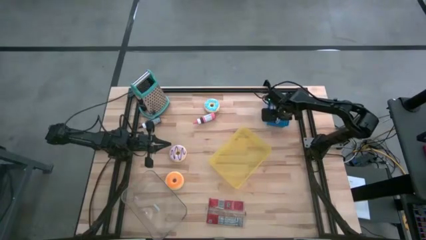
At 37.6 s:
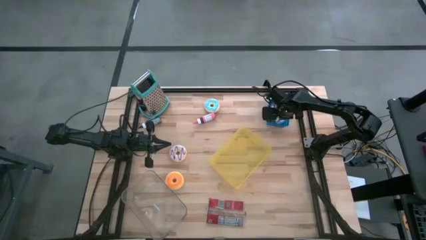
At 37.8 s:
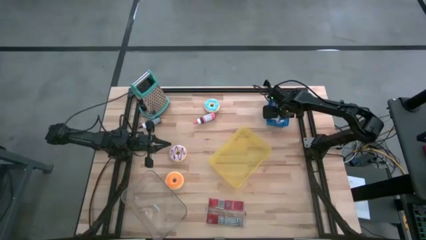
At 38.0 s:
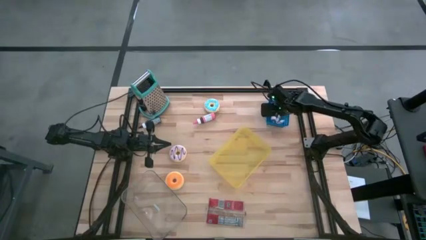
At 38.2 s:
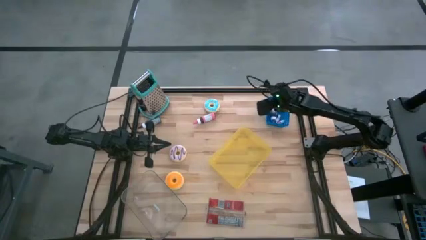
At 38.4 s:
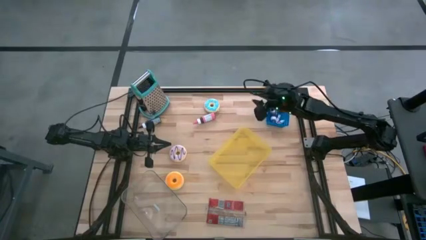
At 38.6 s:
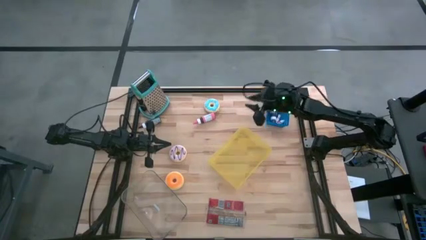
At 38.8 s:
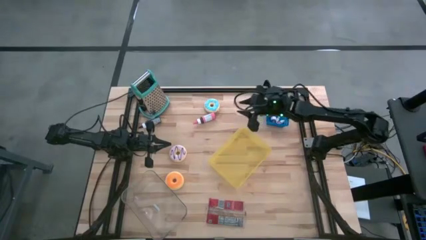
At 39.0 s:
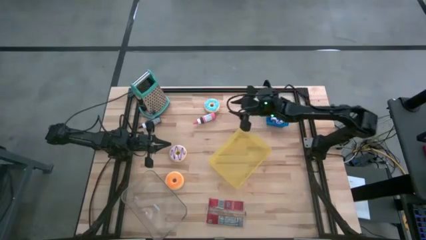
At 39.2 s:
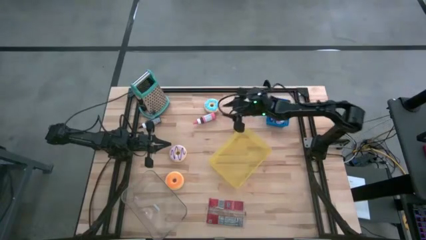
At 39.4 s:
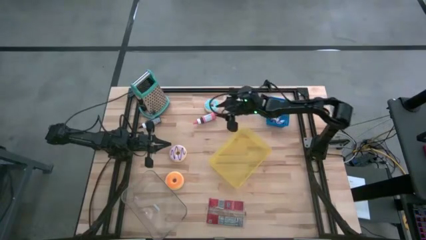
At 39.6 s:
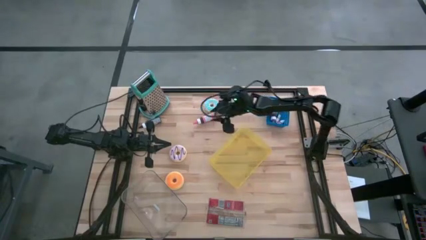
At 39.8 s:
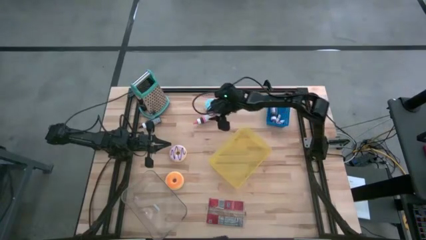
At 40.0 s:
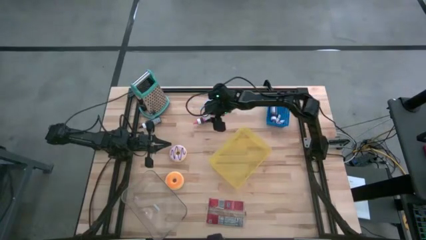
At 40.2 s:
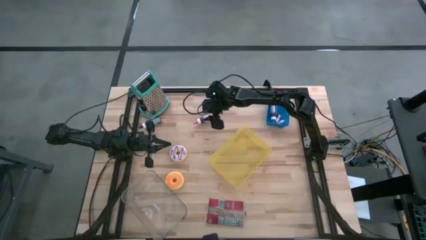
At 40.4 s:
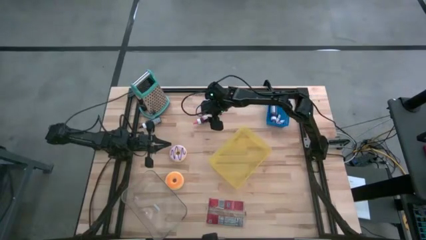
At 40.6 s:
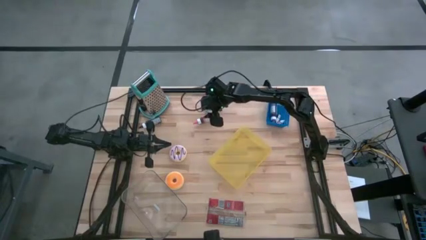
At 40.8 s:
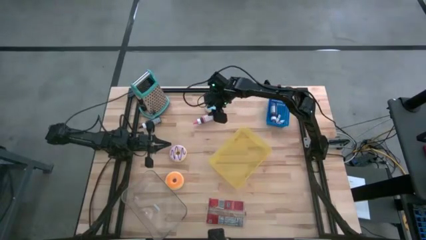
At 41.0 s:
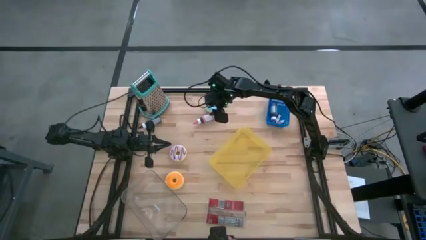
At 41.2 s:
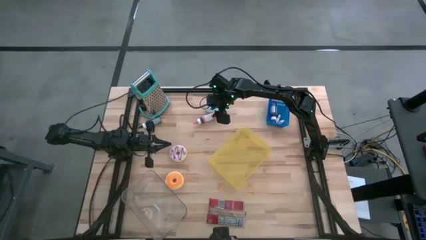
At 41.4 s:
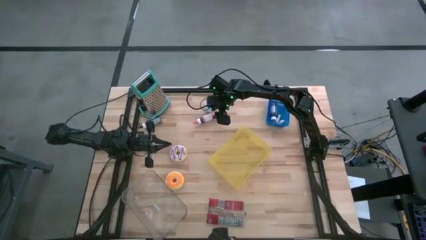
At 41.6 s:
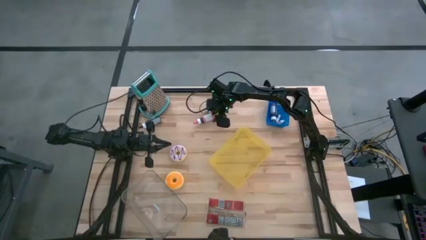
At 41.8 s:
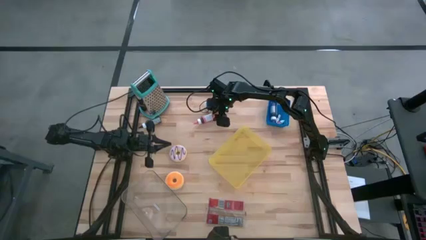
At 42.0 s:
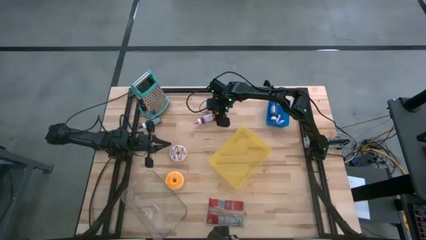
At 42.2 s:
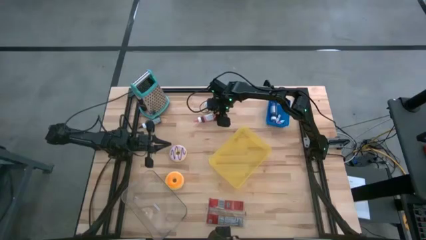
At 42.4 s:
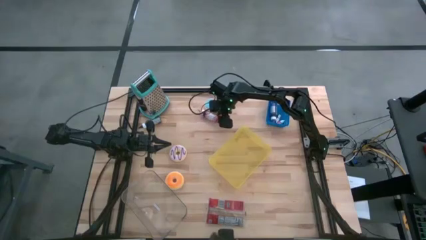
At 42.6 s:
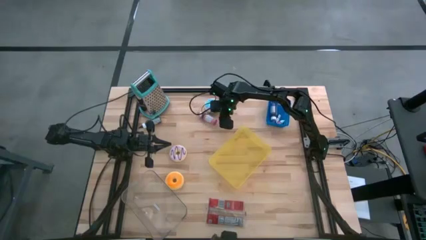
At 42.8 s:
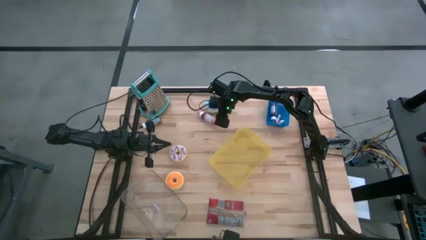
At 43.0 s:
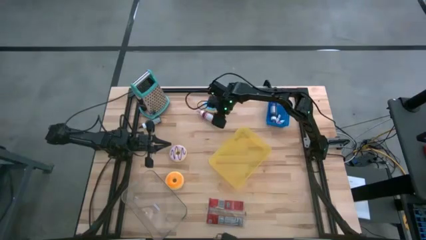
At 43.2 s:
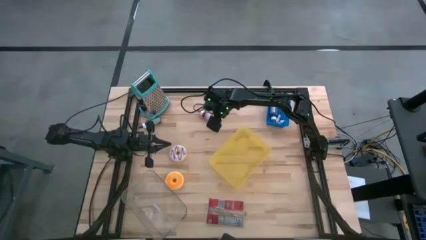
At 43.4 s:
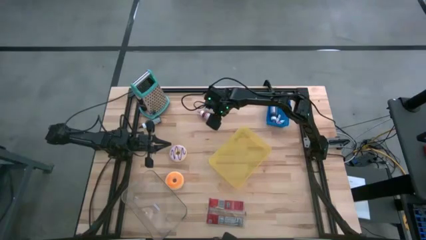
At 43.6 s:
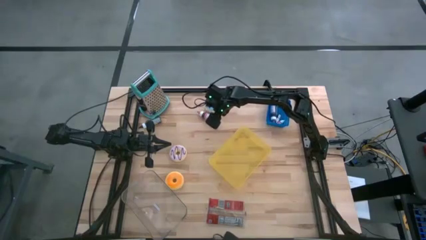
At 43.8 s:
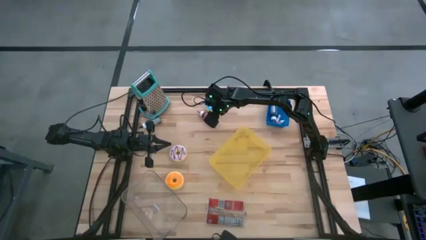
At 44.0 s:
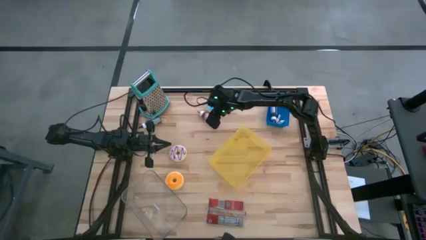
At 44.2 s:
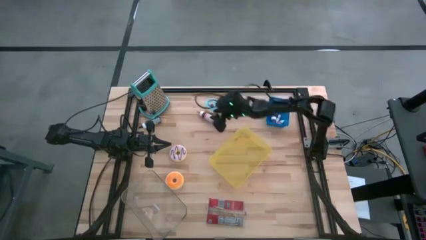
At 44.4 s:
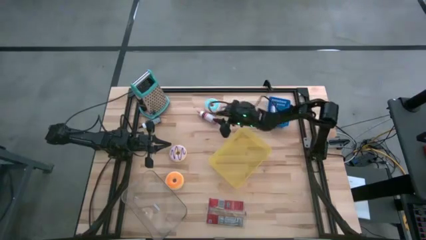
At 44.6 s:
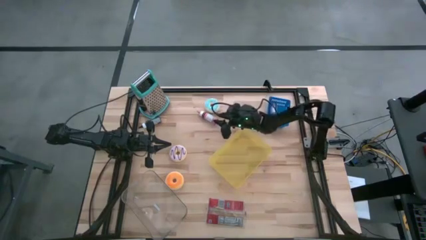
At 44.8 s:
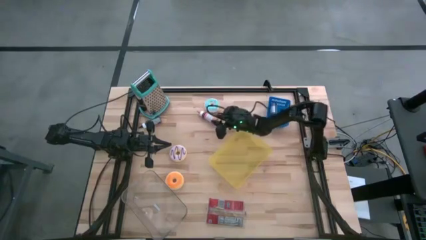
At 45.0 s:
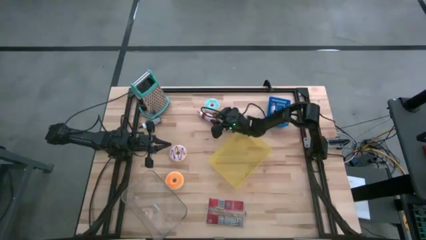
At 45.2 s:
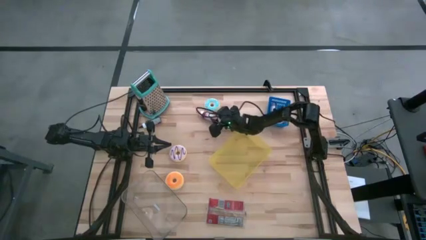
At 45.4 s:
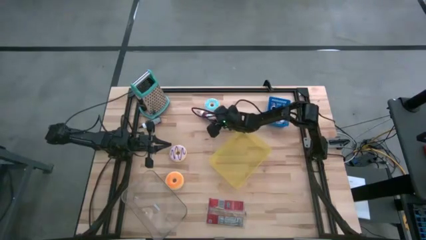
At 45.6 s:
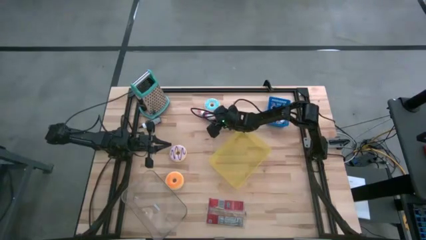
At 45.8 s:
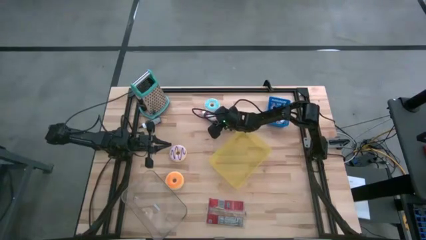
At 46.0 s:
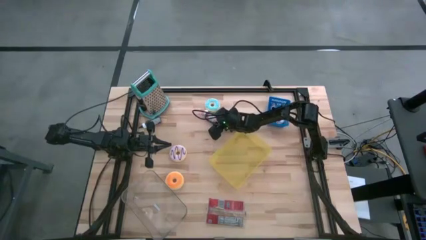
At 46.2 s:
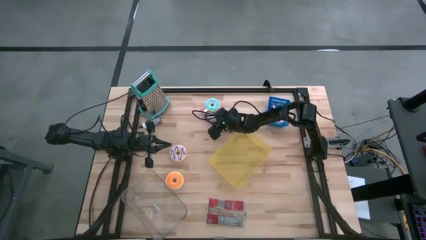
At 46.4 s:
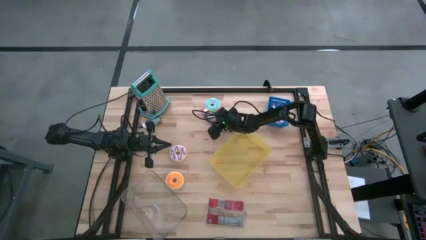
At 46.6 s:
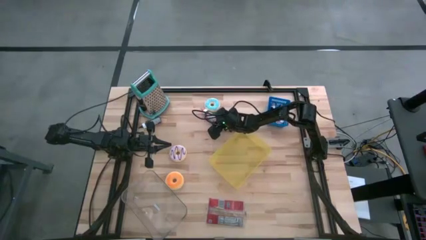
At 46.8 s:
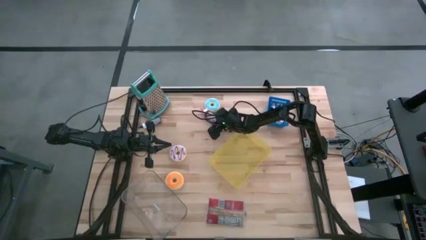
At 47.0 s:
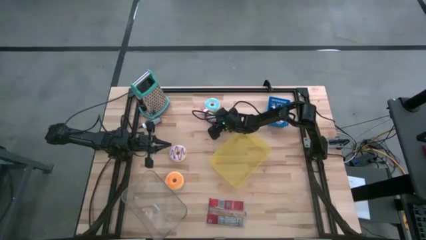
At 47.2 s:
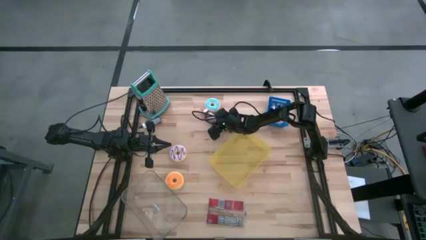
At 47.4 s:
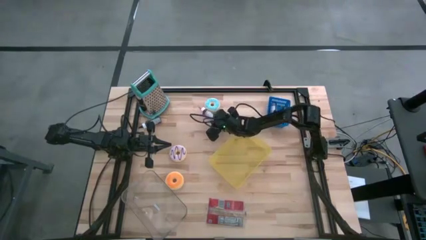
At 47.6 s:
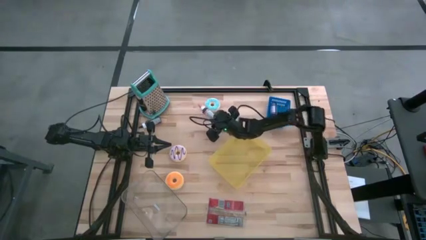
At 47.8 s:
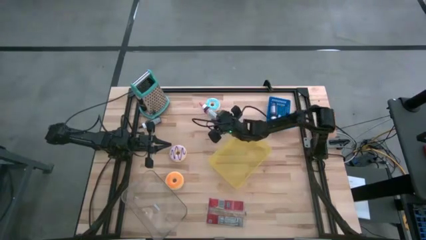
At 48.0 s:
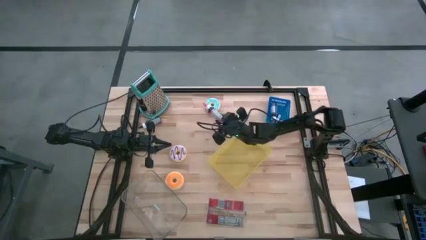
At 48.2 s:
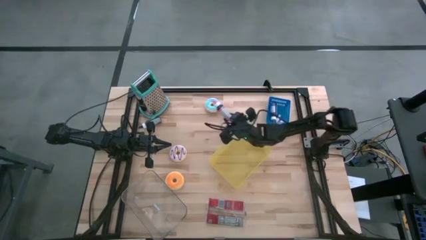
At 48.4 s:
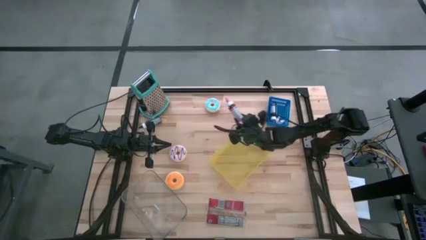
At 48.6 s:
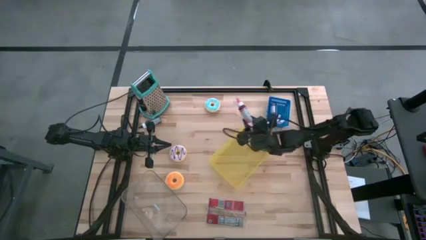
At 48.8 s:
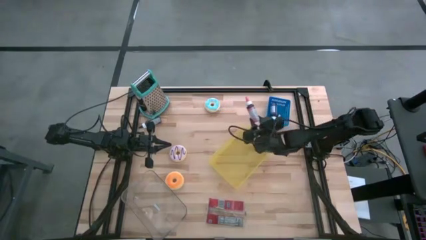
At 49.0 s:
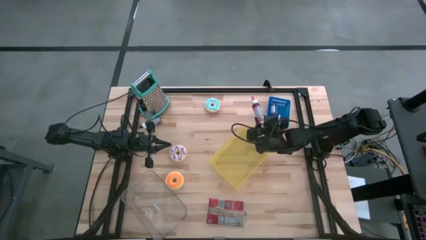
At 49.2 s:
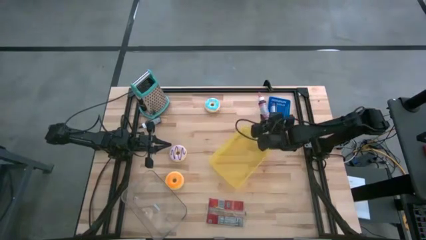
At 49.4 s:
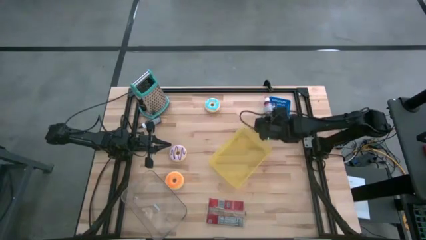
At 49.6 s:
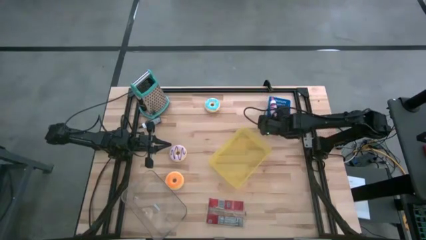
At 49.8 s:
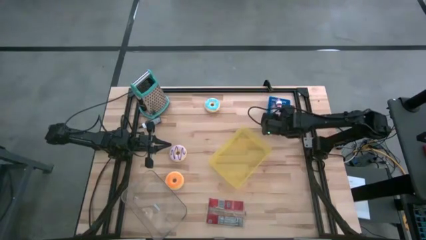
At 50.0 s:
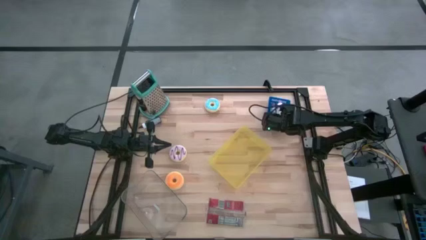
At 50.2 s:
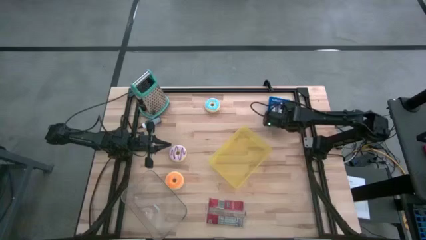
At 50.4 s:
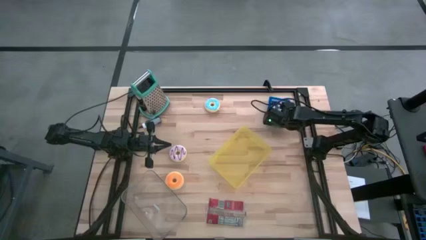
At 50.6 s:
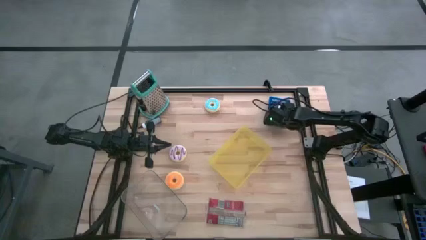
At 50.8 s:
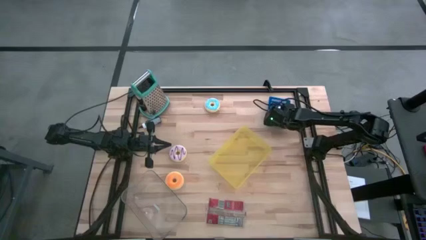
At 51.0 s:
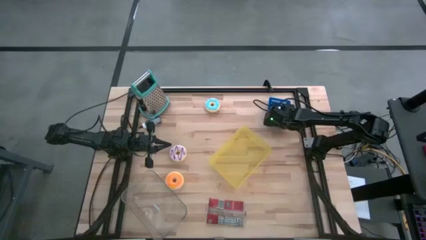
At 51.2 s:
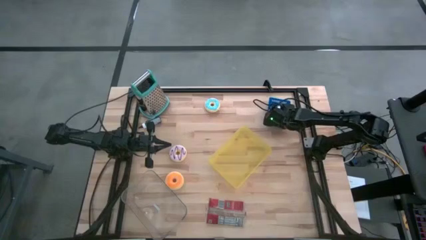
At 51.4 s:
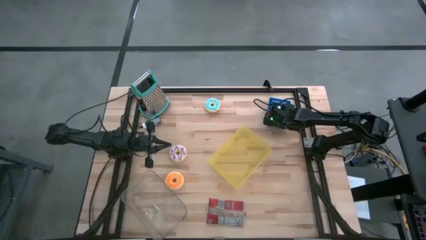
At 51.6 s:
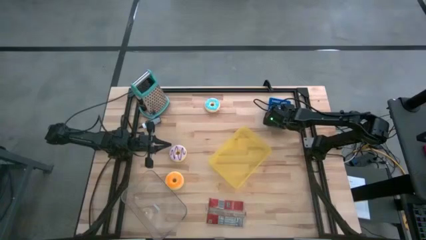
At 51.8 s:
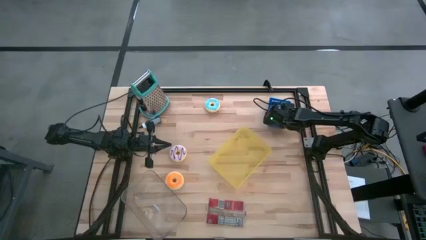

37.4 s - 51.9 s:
Task: Pick & Place Food Item
Put the large pink food coloring bottle into the blue bin
